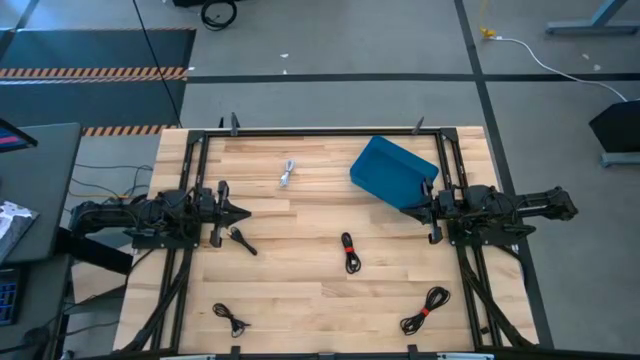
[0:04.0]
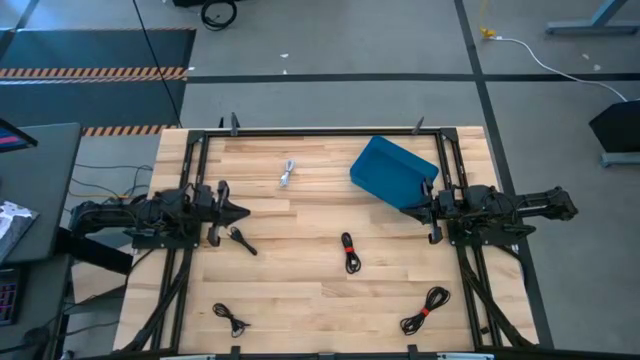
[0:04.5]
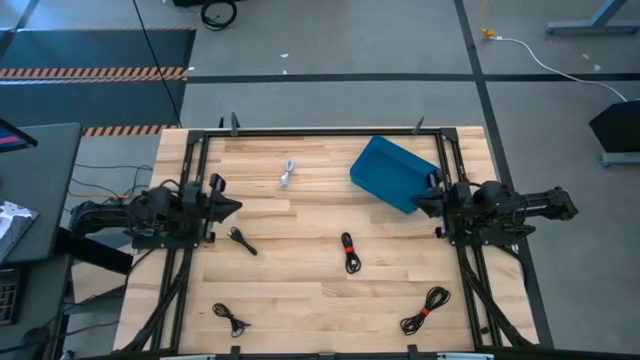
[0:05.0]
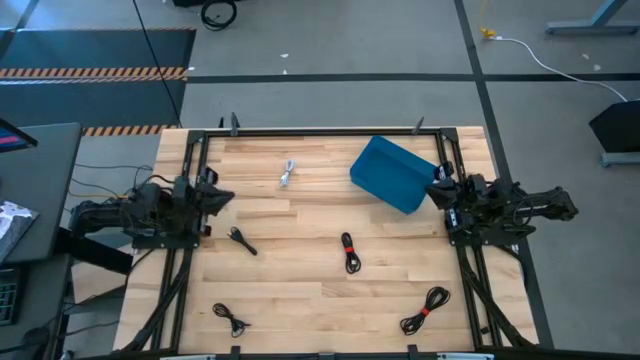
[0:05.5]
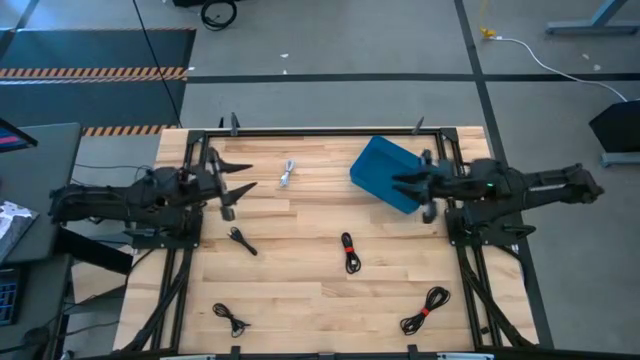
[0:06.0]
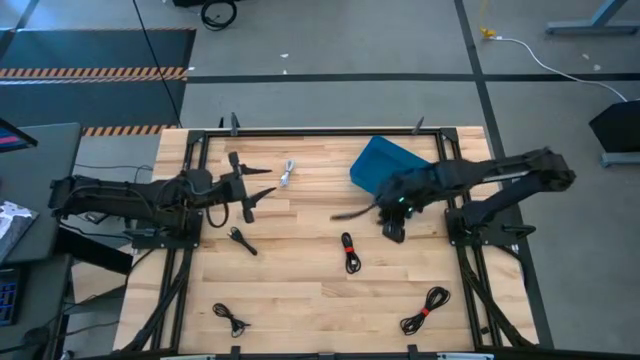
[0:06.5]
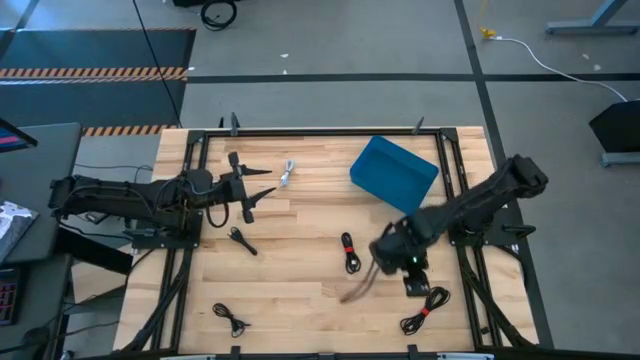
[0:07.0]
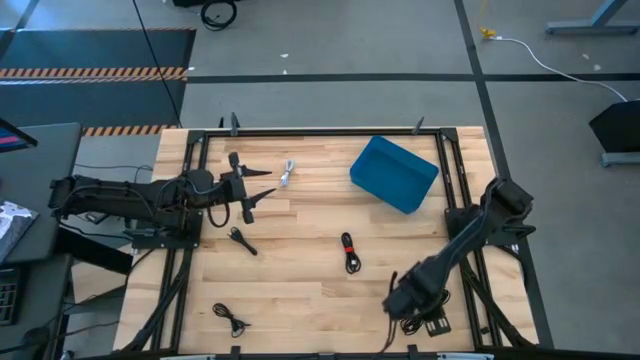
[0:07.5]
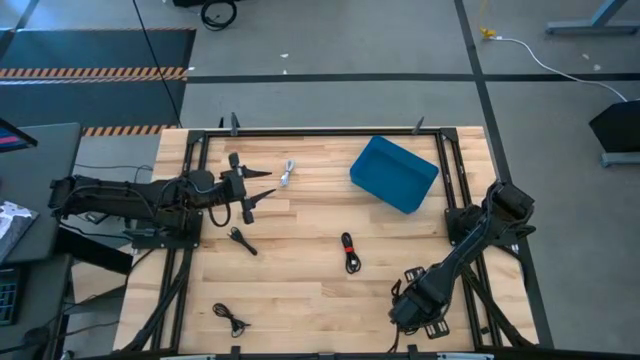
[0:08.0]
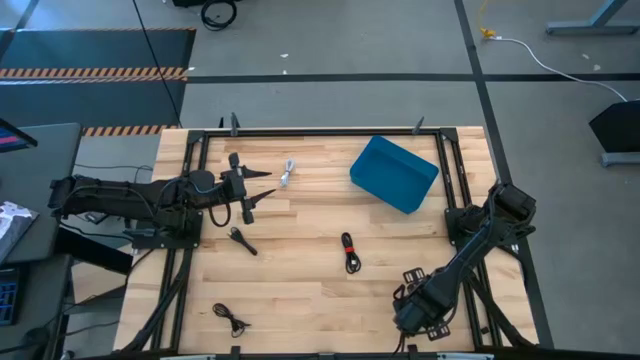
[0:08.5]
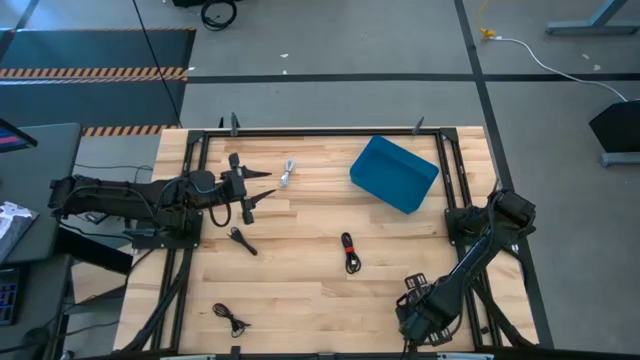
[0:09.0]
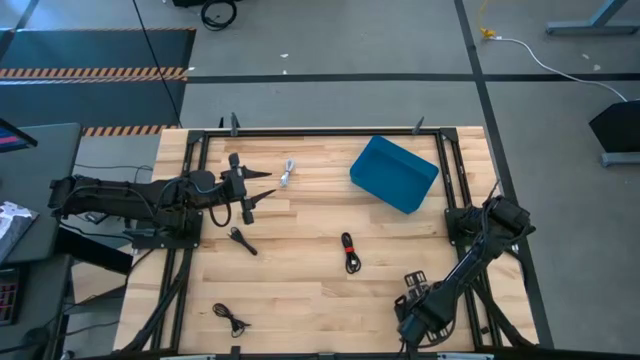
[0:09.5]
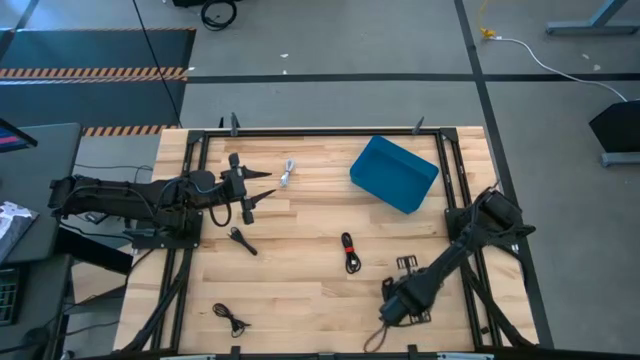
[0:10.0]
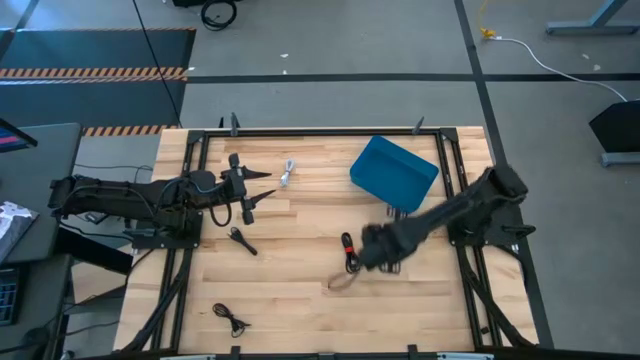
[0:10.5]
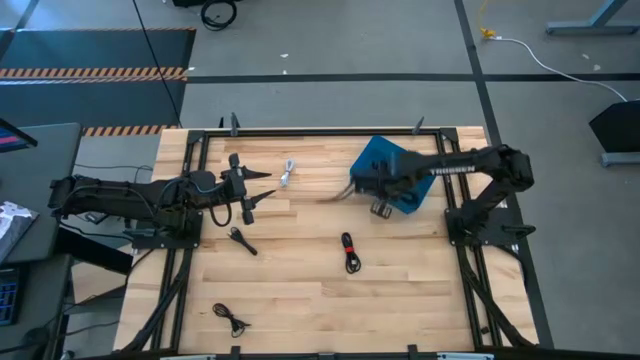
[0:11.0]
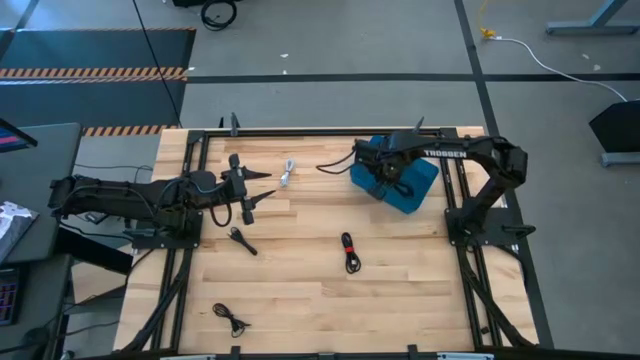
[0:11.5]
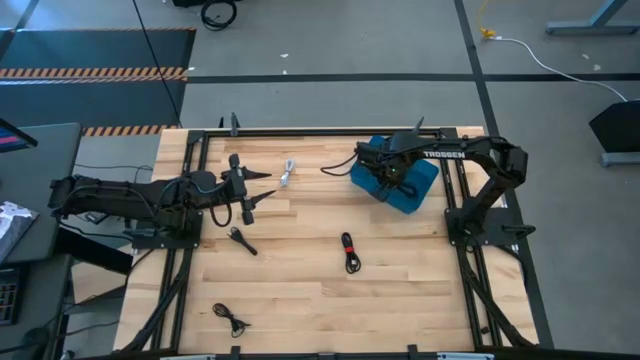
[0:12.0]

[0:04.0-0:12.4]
Task: Pick and place USB-C Cables
Put the black USB cable into the blue bin

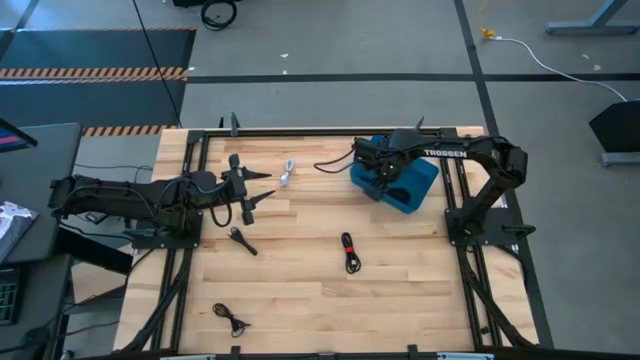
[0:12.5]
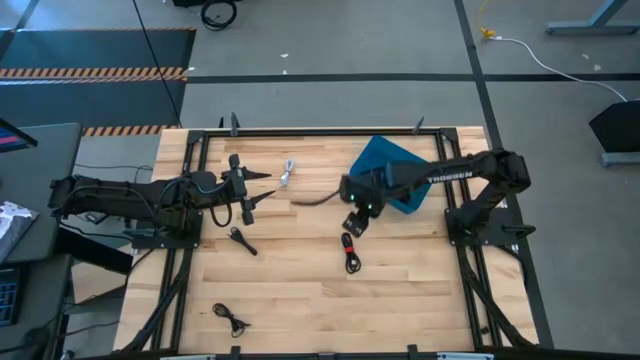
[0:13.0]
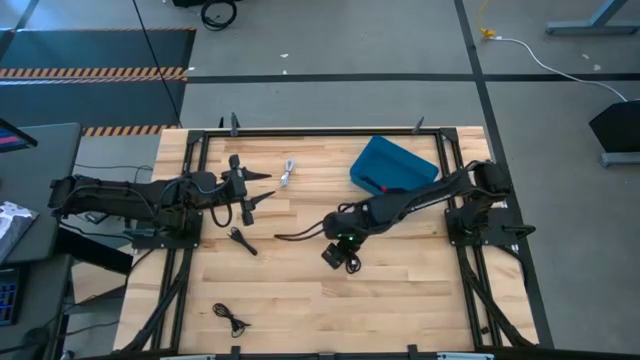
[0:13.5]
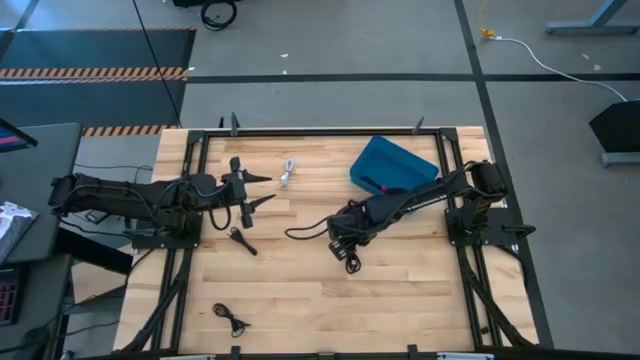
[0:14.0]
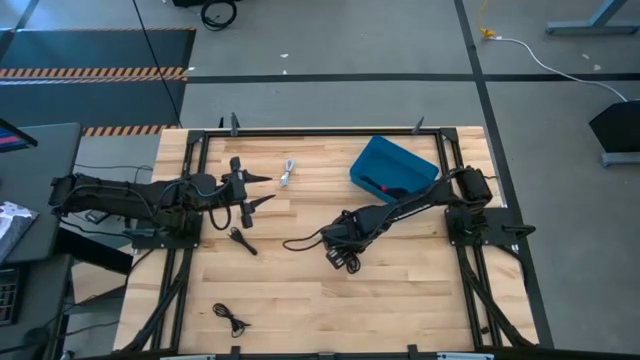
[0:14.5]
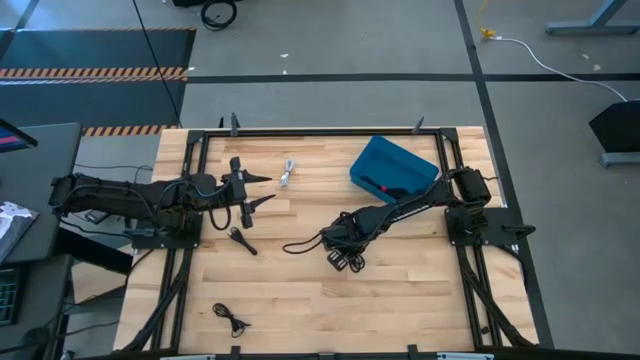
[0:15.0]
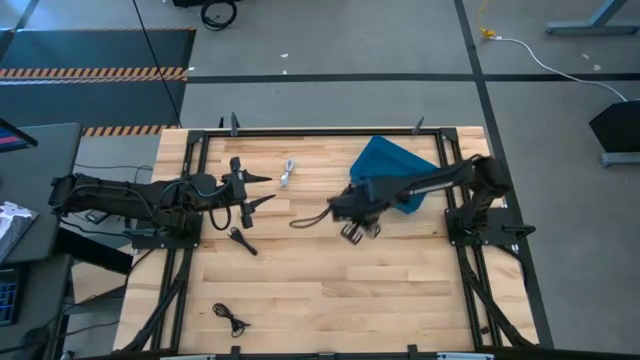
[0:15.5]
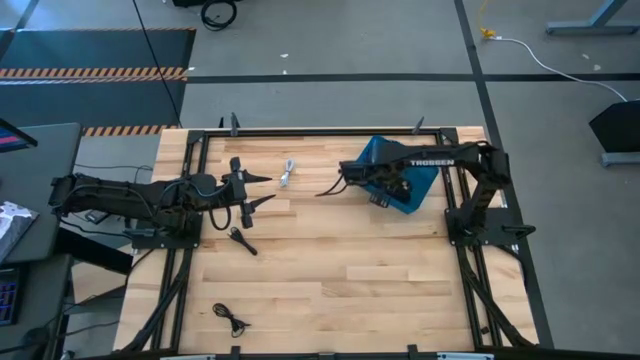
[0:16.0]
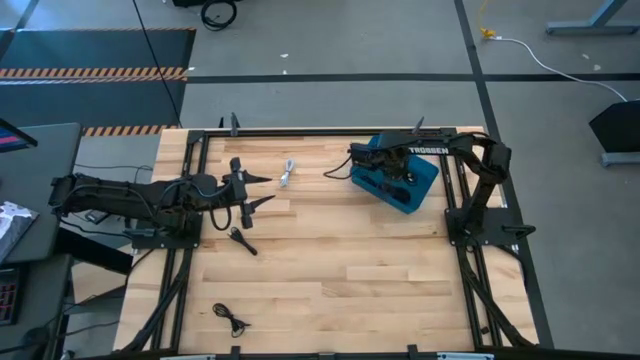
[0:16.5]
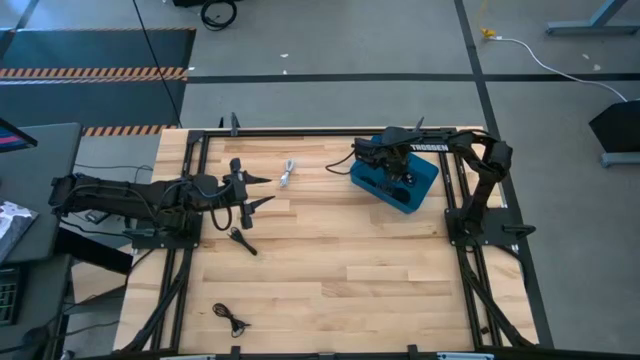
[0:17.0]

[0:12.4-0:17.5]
Put the black USB cable into the blue bin

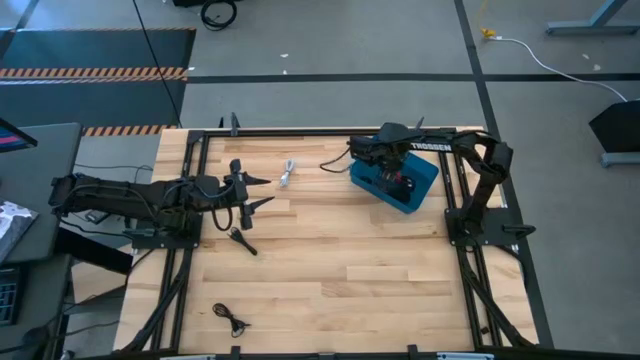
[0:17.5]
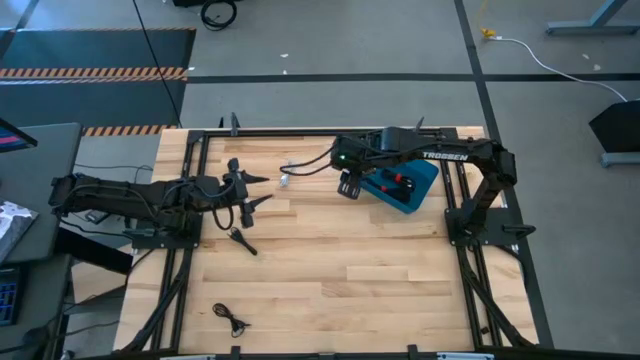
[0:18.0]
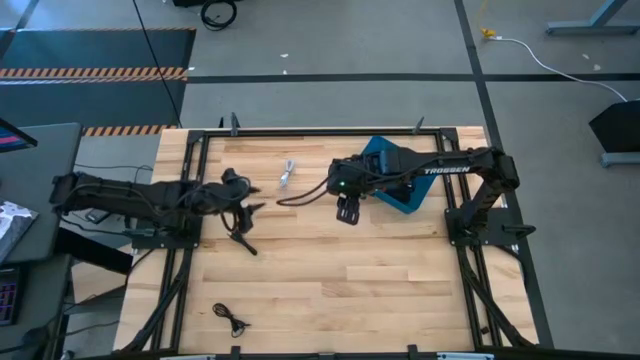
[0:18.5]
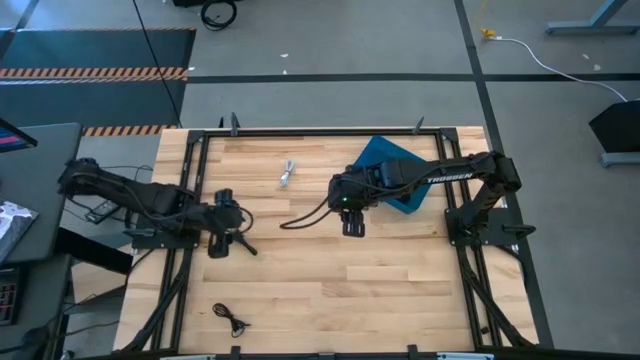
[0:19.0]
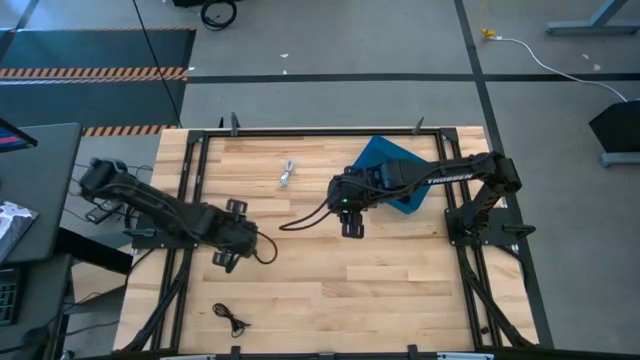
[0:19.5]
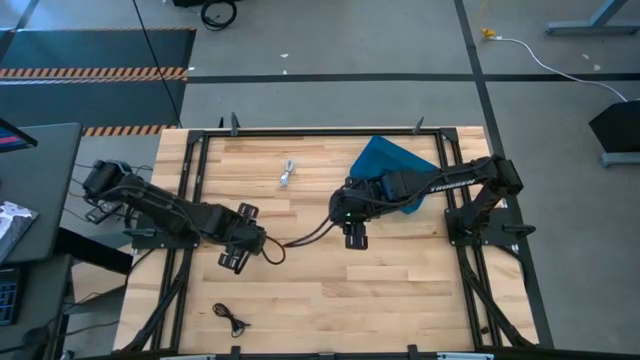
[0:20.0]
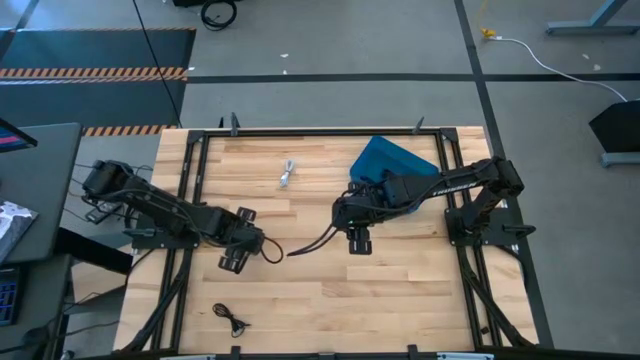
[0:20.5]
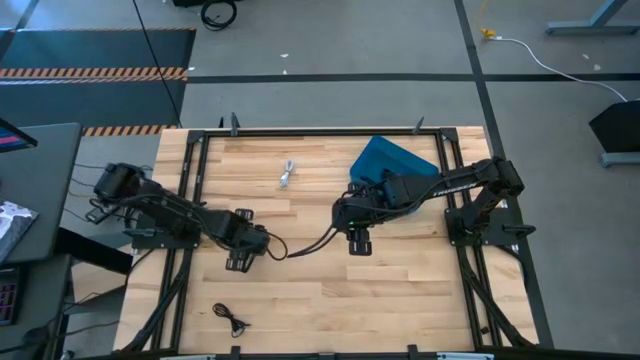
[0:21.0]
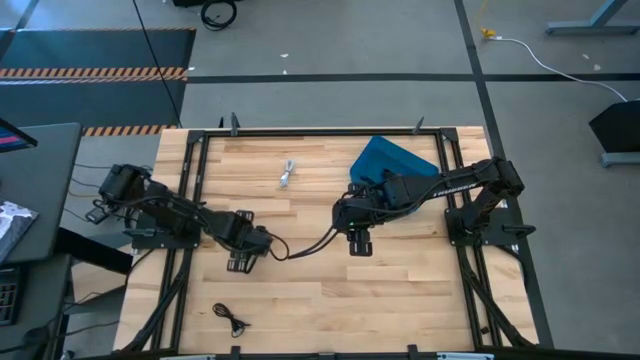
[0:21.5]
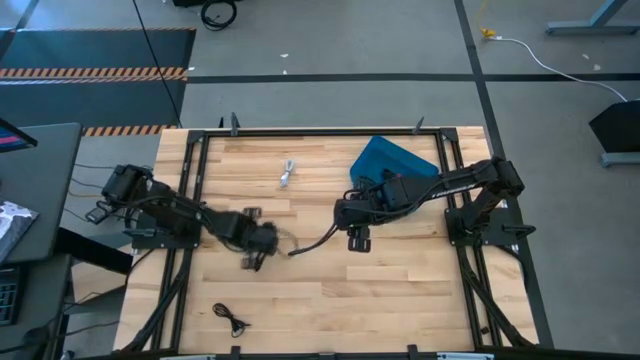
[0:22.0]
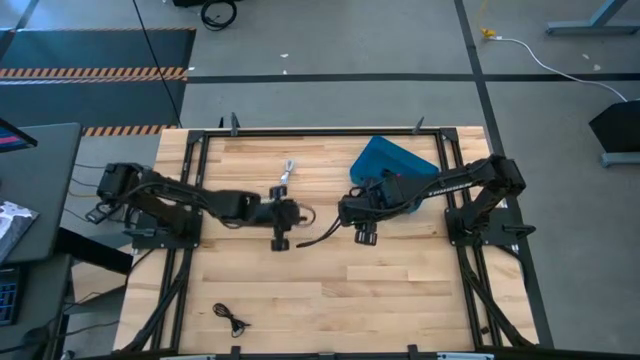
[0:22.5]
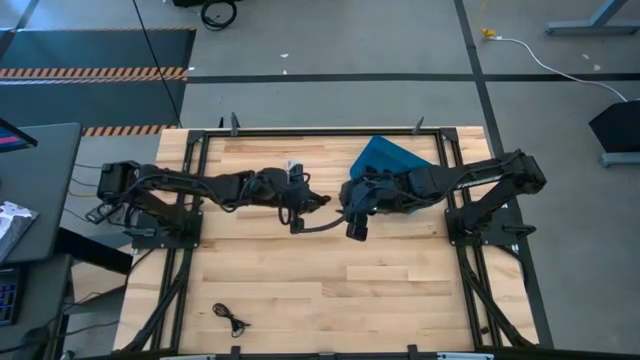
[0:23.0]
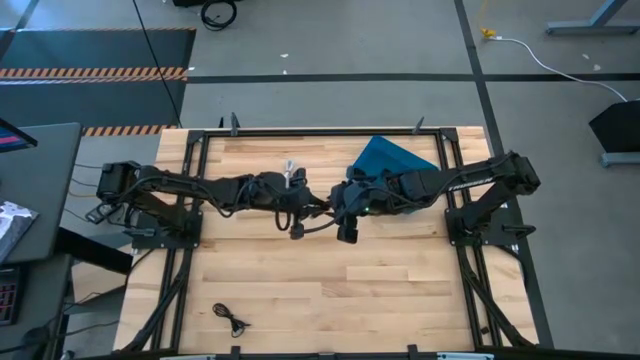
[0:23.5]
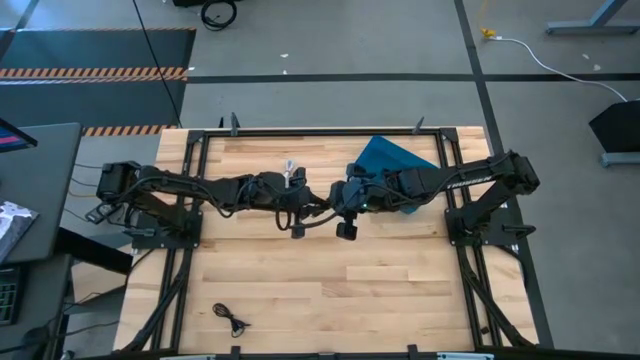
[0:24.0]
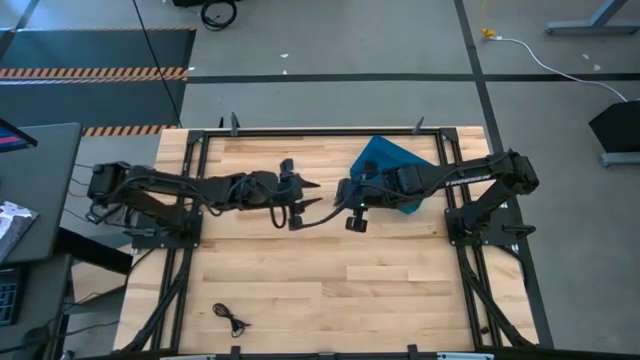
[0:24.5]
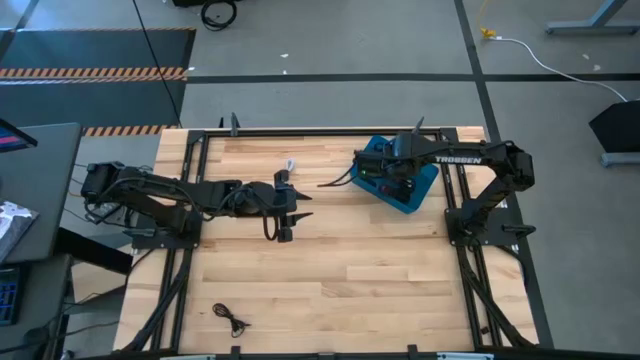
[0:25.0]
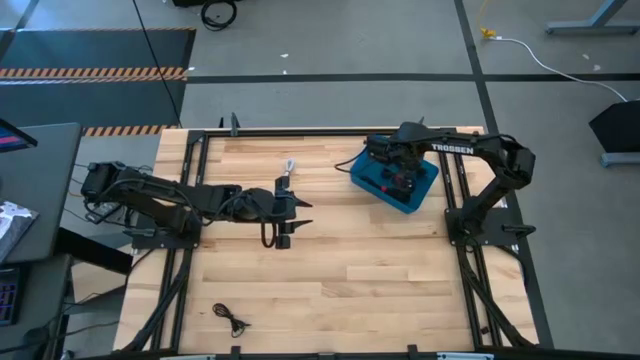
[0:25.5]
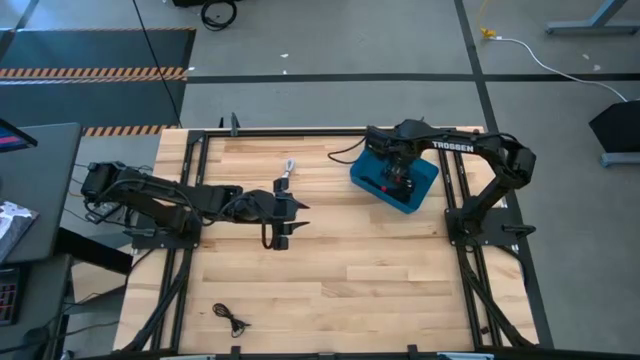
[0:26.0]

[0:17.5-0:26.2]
Put the black USB cable into the blue bin
